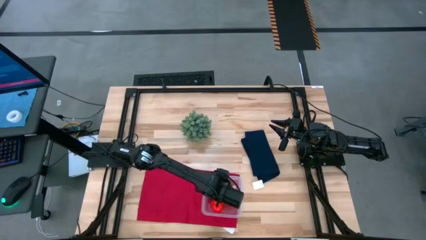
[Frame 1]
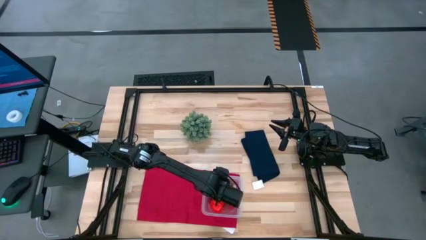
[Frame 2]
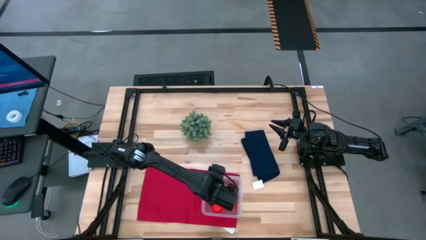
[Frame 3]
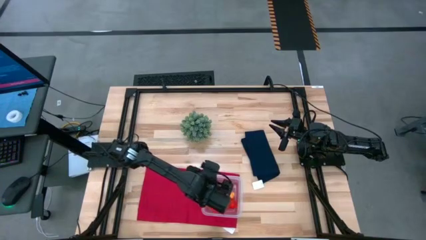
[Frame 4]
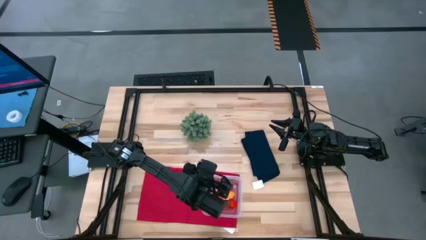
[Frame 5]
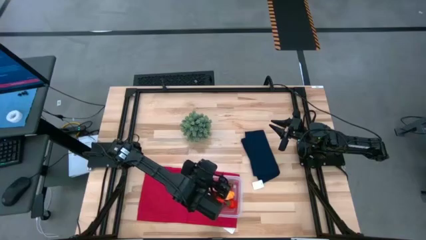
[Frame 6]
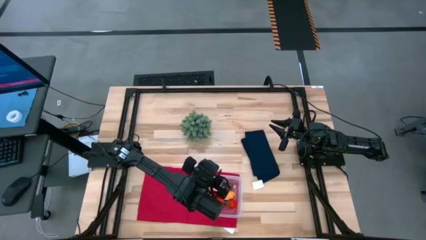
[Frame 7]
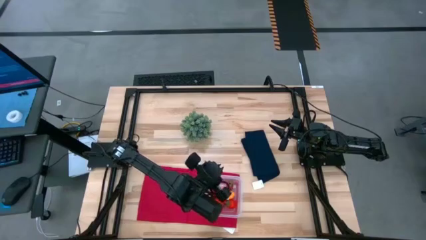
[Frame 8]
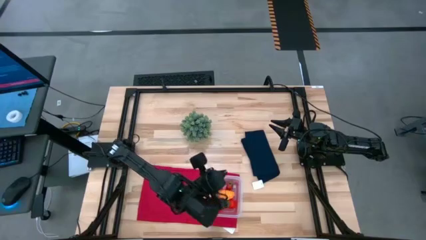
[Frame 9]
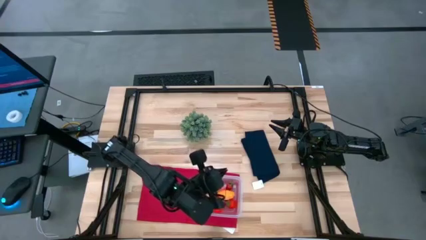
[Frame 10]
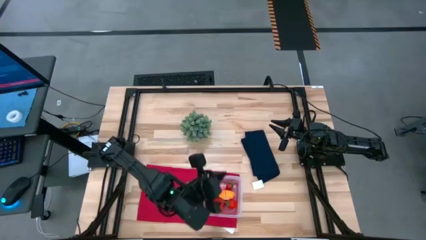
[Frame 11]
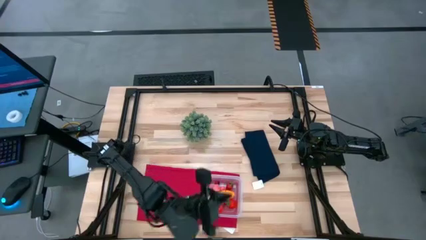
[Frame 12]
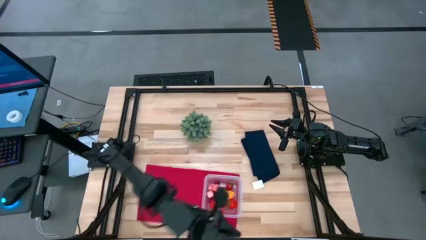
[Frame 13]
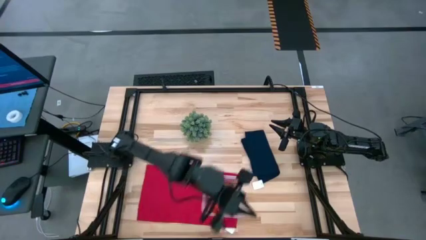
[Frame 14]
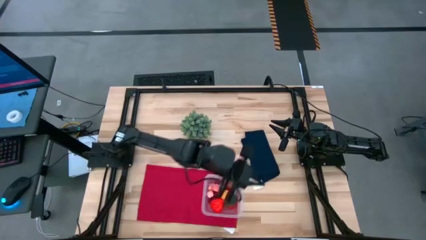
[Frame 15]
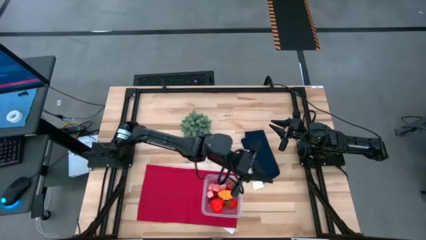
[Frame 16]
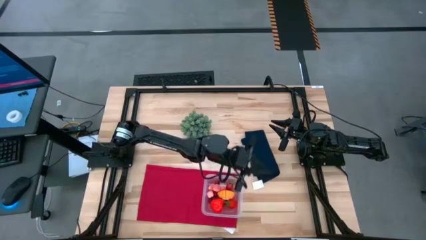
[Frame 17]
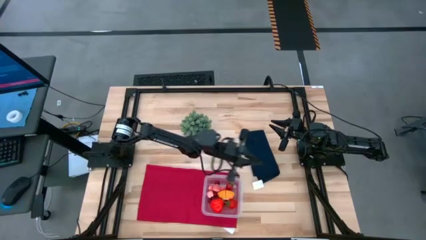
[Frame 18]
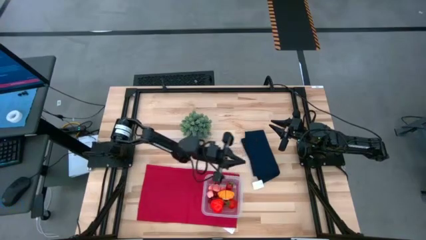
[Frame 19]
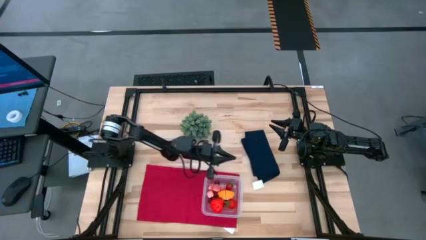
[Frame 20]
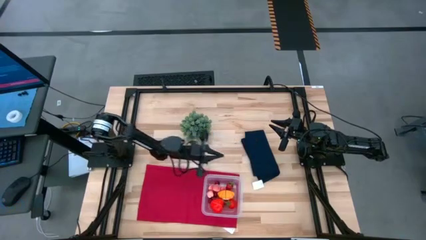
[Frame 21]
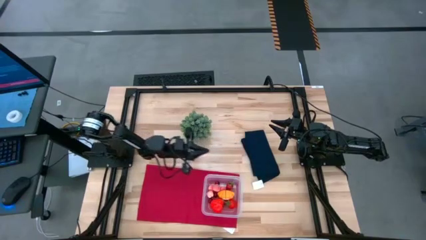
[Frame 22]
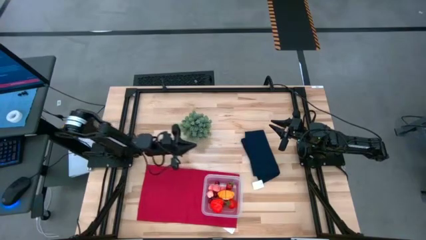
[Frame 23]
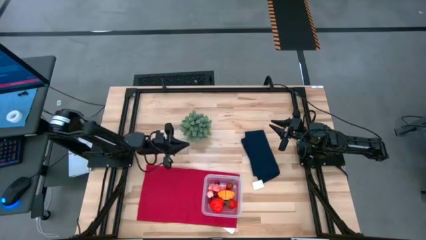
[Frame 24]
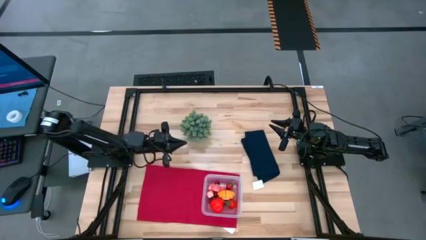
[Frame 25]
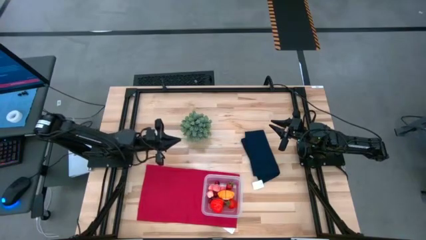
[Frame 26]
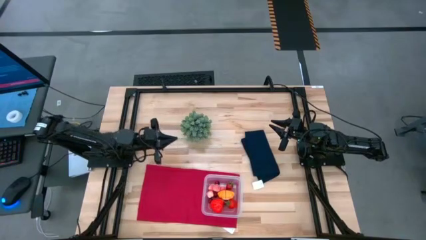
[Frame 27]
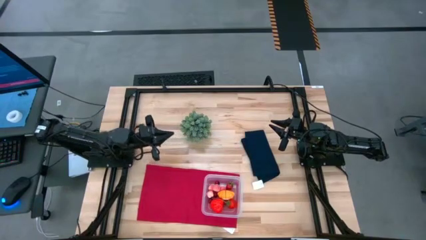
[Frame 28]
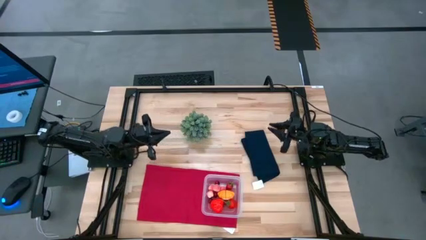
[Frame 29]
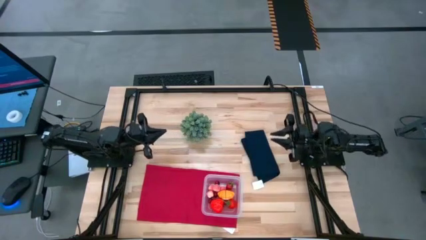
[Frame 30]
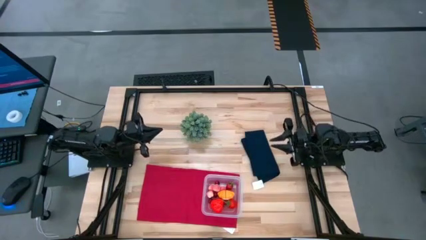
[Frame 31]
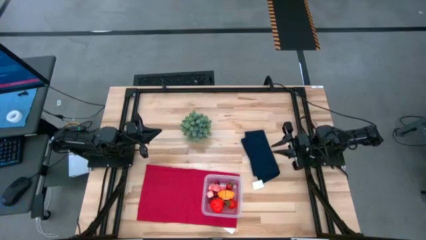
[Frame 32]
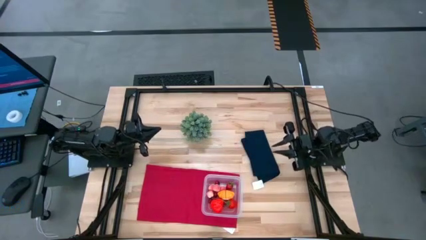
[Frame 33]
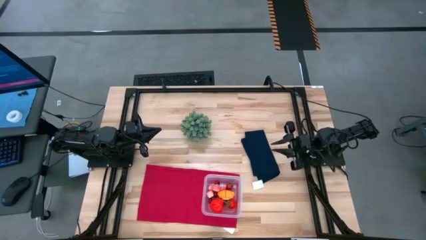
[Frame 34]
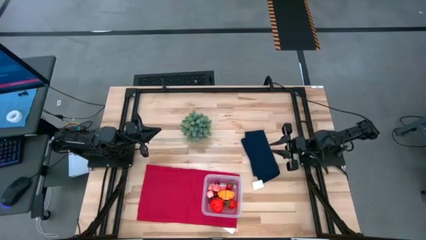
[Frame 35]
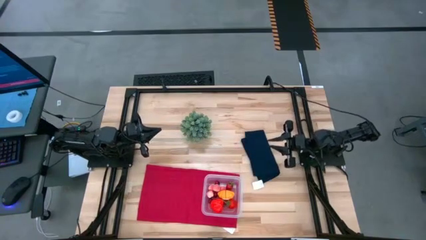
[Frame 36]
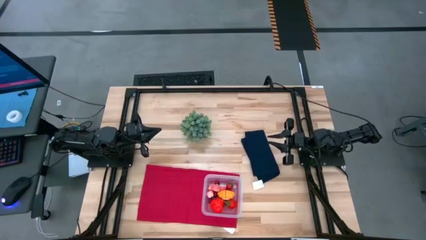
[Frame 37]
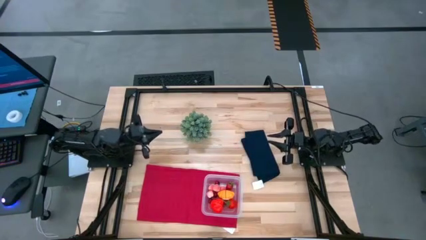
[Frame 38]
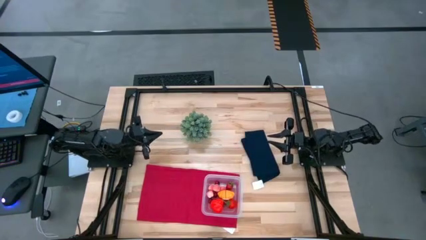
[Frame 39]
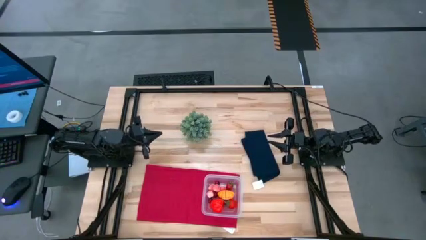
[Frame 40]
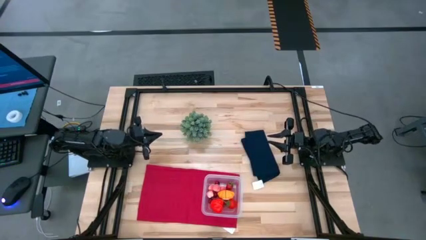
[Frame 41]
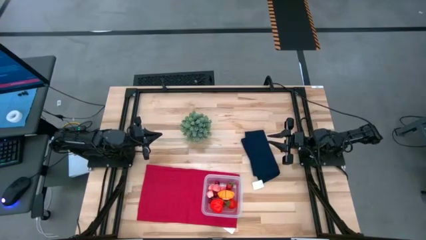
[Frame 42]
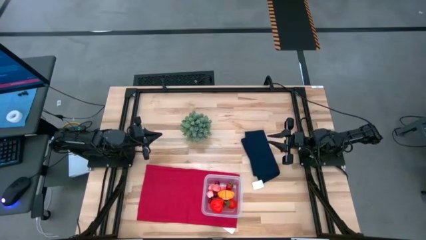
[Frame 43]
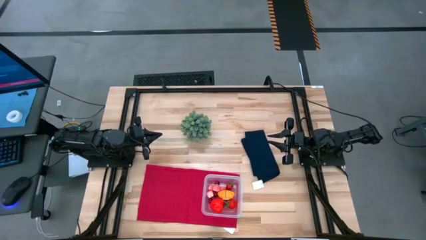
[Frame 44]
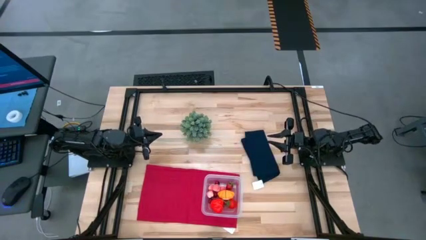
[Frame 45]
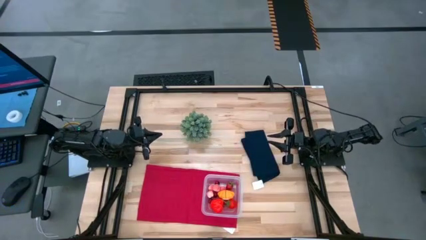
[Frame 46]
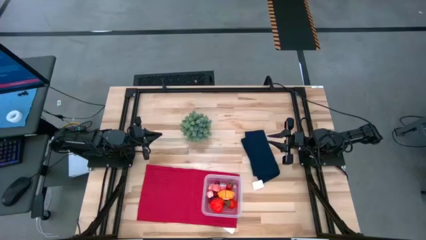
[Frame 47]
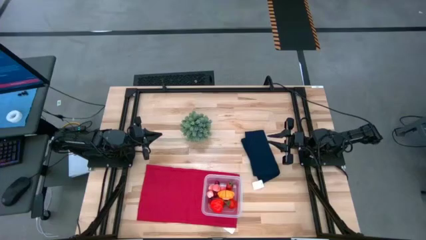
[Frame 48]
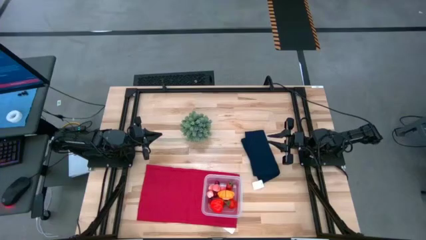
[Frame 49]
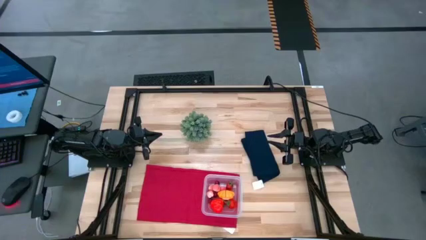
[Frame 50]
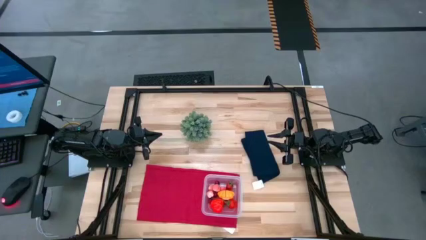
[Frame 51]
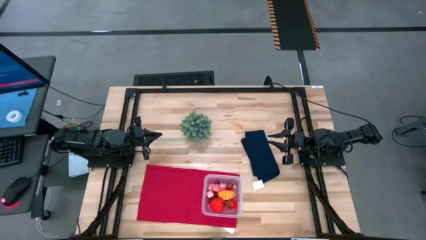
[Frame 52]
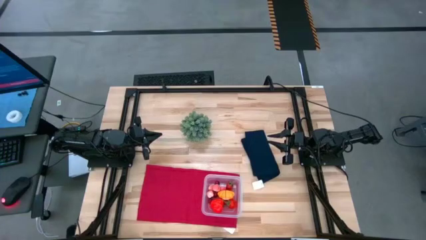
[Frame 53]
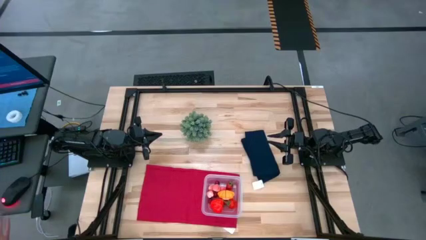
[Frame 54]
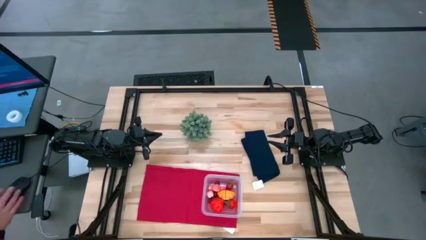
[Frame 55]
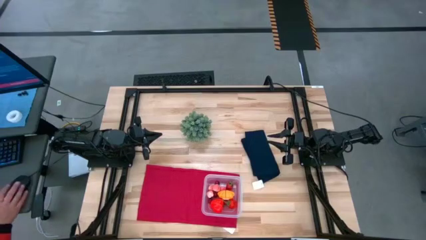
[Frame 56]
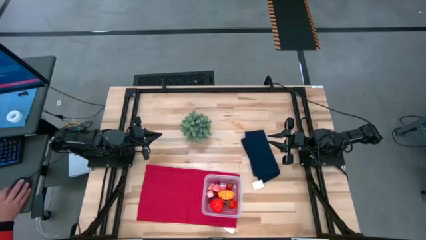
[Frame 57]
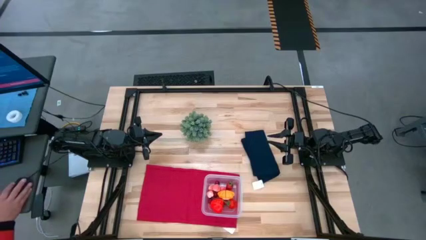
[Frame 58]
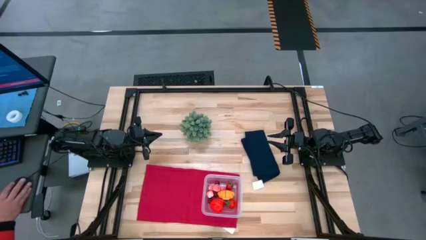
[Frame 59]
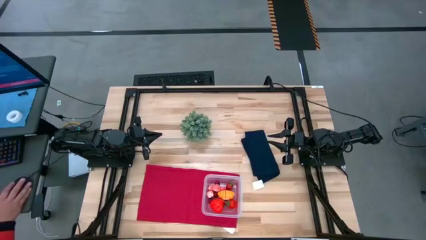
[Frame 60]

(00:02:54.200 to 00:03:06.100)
Task: Pick and placing Produce into tupperware
Return to Home Position

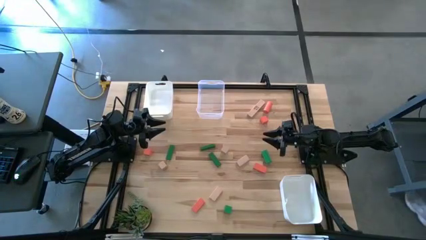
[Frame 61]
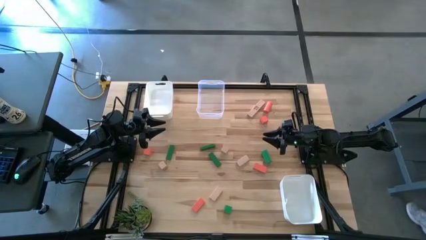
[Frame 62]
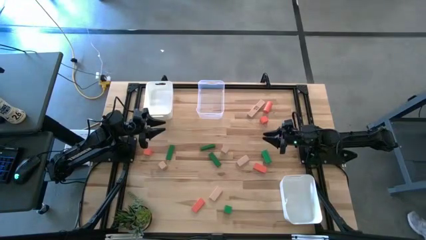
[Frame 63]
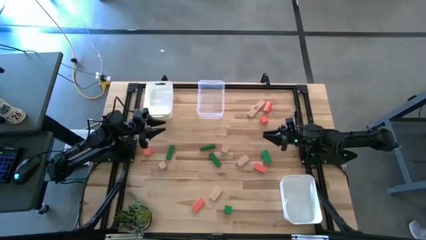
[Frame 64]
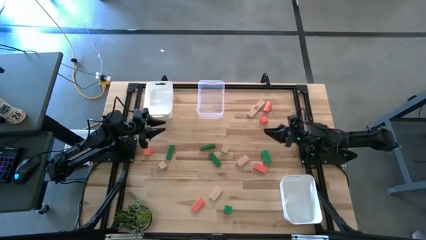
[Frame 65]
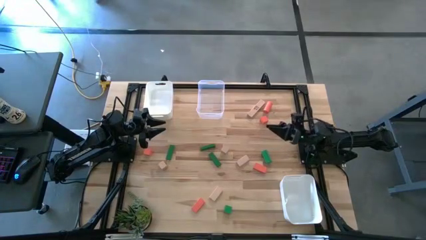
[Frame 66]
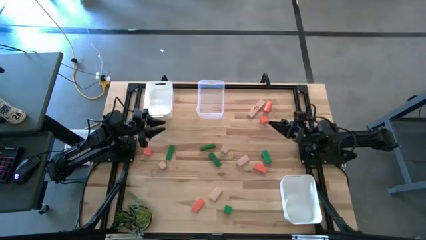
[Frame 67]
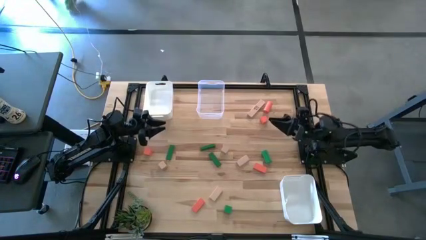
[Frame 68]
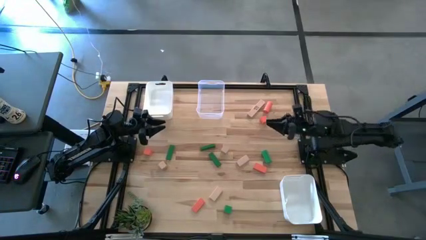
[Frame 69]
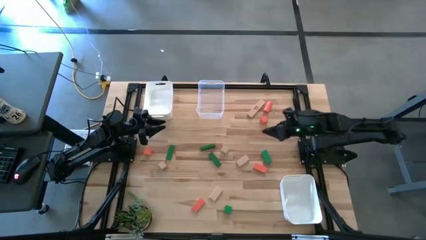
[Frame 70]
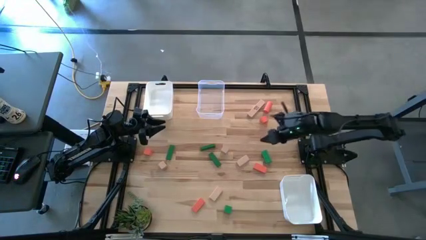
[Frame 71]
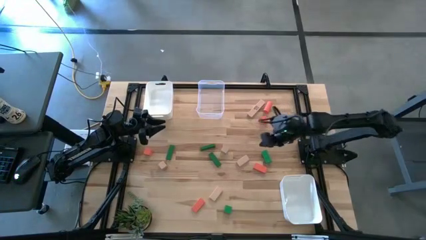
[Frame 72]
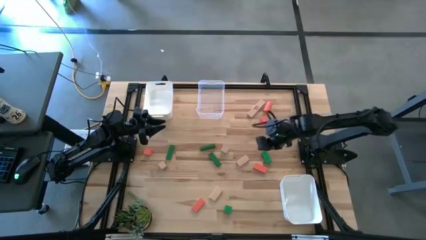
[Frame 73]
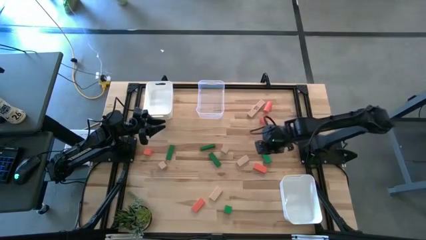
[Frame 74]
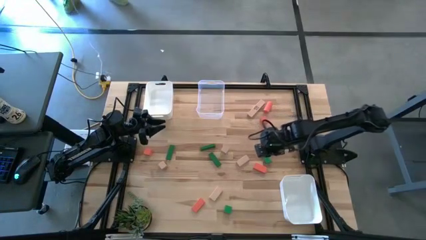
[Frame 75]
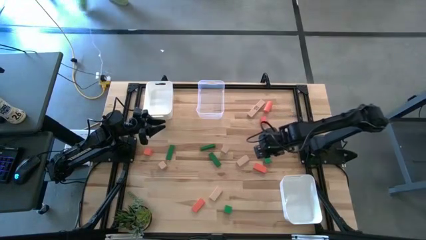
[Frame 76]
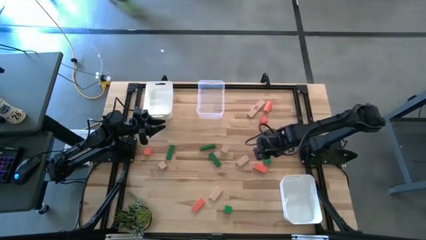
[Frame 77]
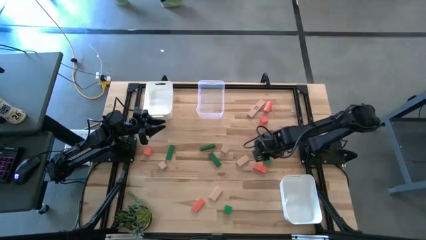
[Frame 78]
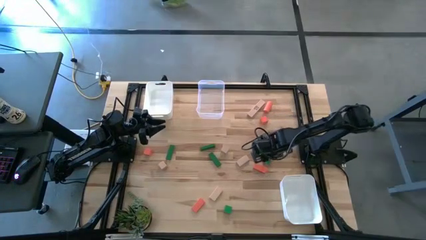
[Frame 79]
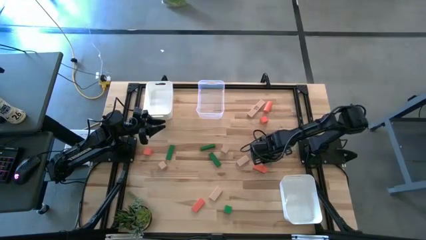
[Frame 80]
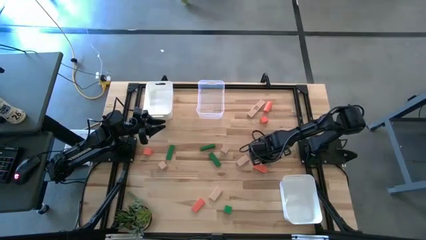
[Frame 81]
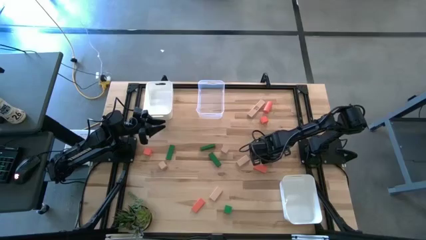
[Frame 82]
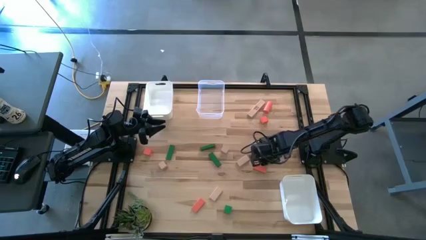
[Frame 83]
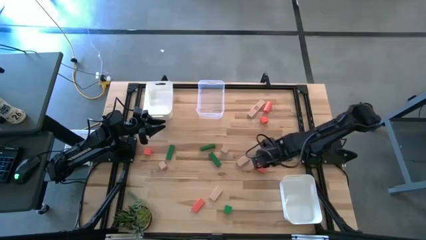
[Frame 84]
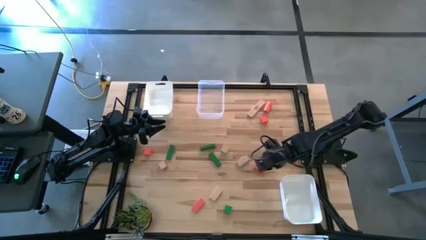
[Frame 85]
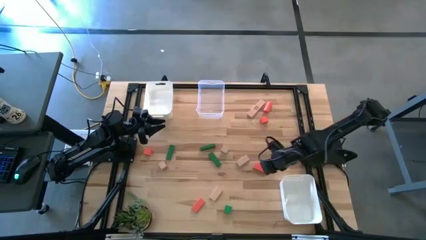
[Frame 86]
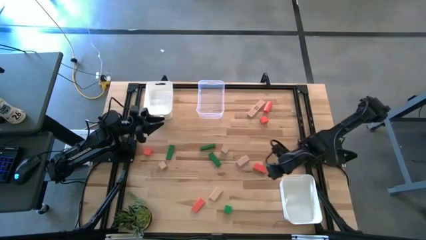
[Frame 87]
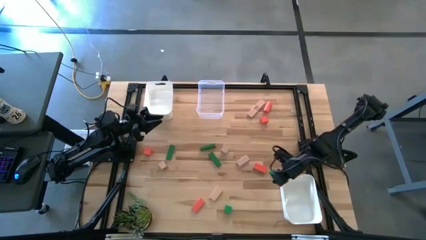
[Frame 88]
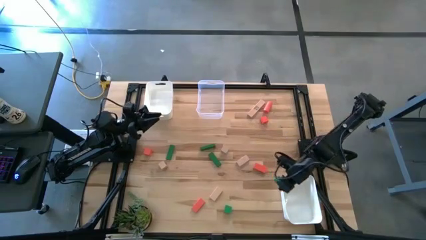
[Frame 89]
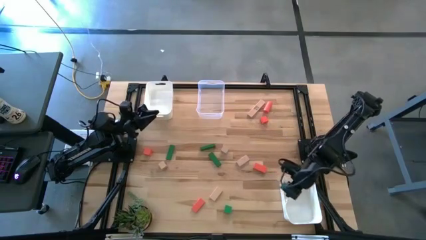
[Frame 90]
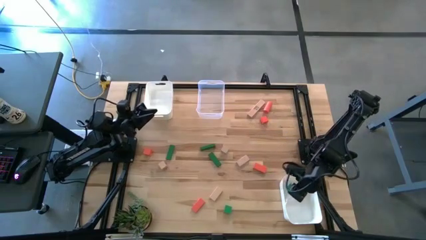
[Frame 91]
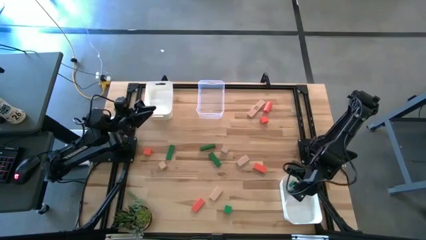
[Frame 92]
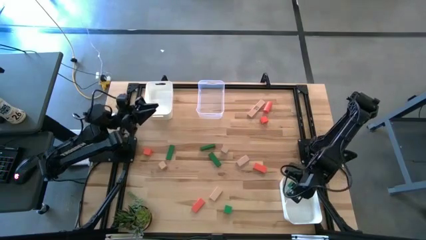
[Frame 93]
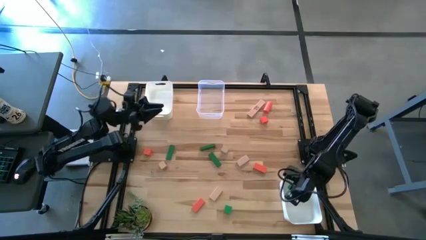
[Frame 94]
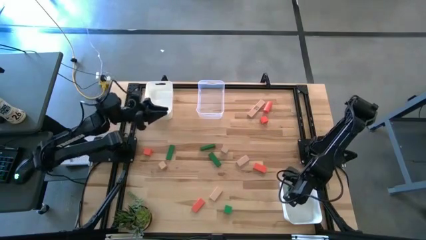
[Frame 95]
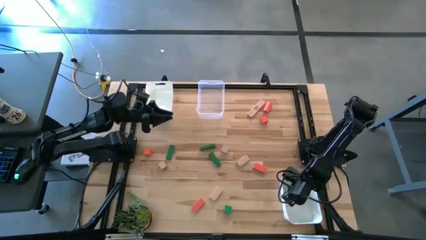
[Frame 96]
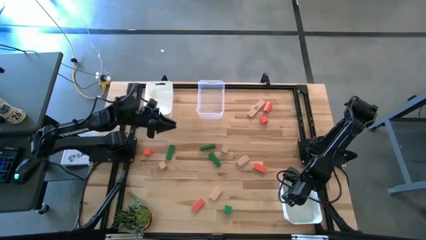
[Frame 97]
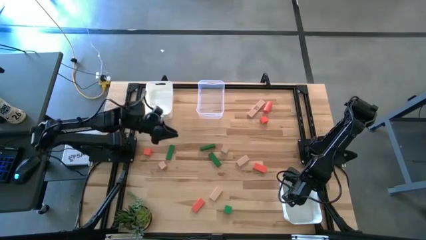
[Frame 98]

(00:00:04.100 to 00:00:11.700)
Task: Sort & place blocks by color
Put the green block into the bottom white bin
